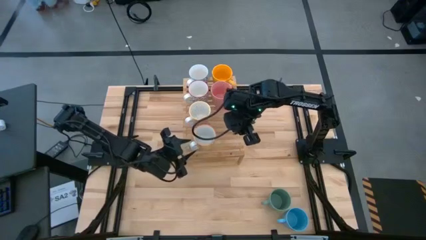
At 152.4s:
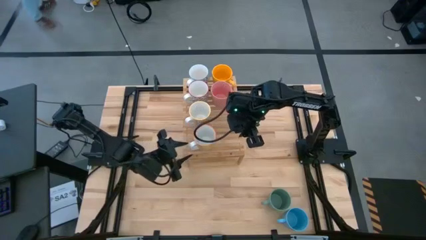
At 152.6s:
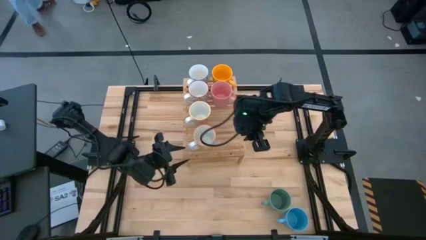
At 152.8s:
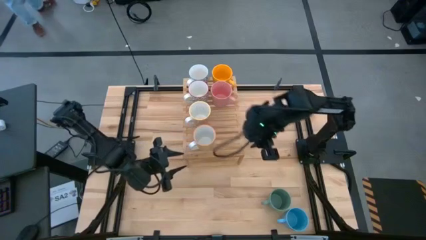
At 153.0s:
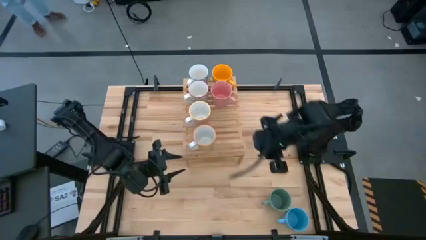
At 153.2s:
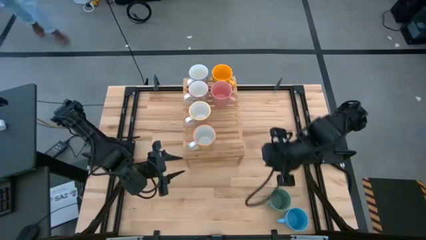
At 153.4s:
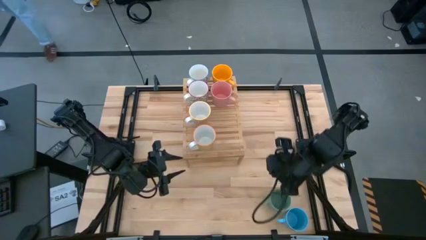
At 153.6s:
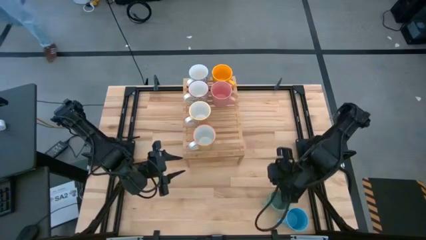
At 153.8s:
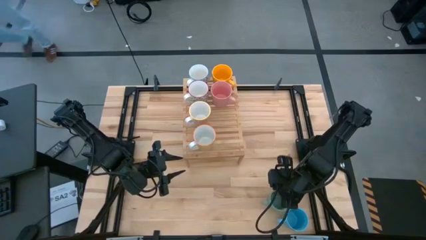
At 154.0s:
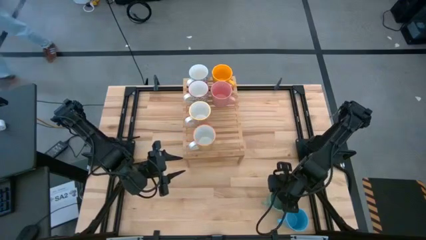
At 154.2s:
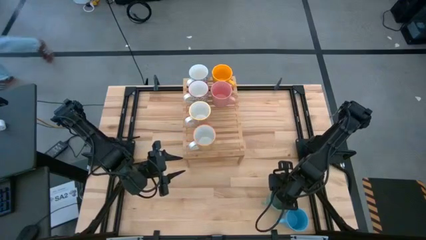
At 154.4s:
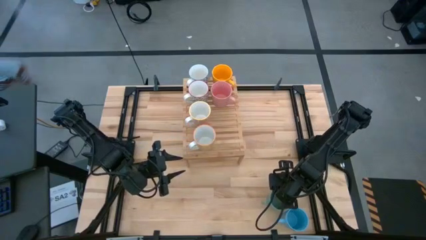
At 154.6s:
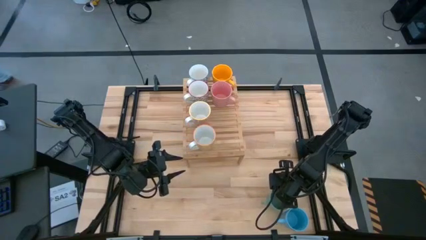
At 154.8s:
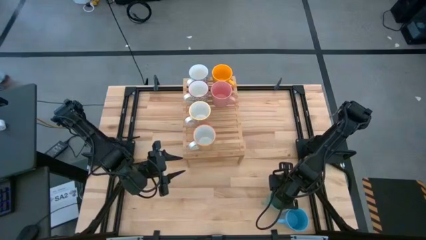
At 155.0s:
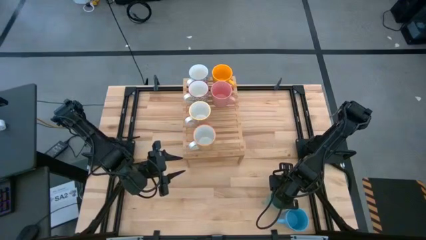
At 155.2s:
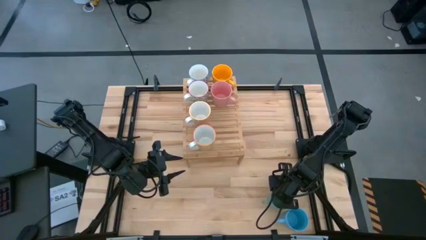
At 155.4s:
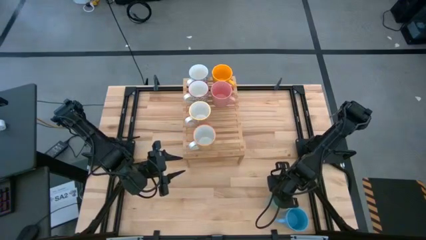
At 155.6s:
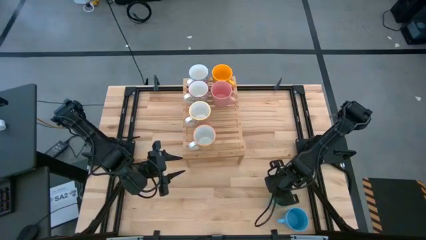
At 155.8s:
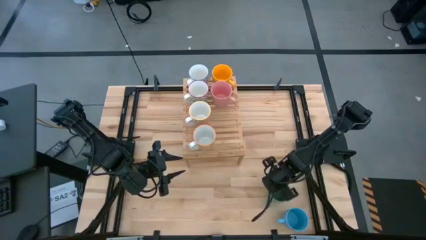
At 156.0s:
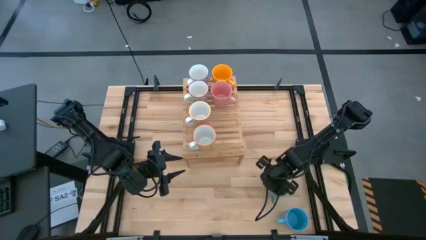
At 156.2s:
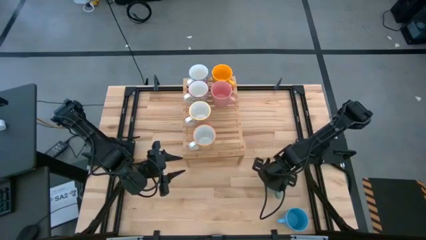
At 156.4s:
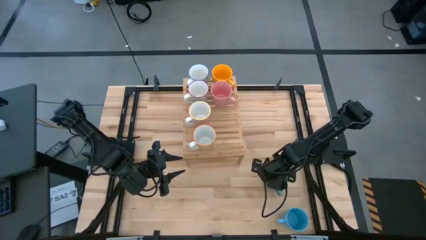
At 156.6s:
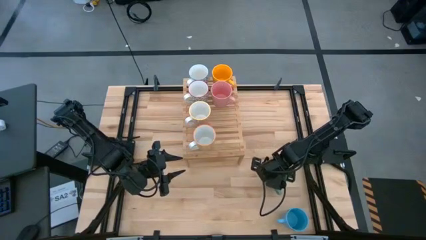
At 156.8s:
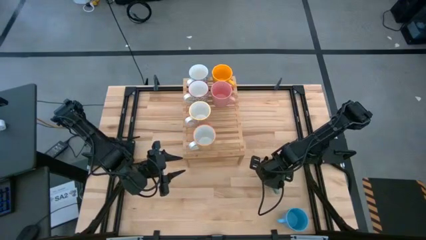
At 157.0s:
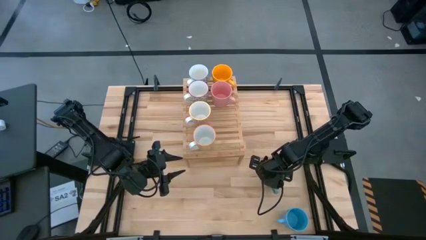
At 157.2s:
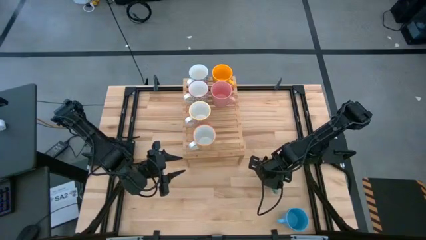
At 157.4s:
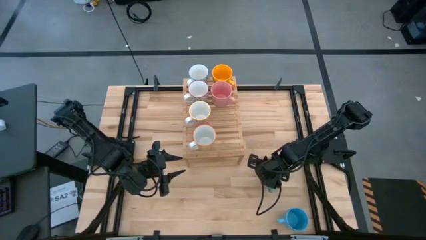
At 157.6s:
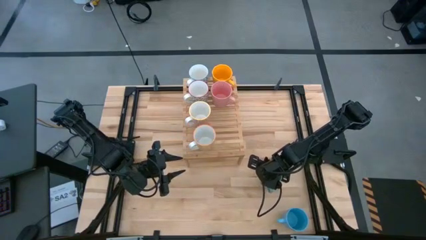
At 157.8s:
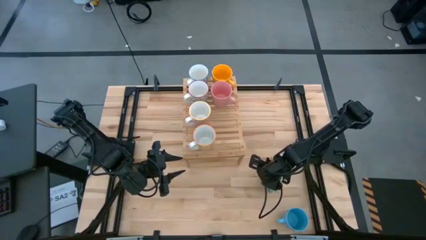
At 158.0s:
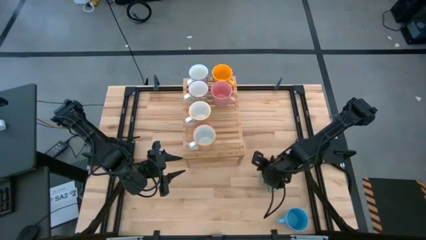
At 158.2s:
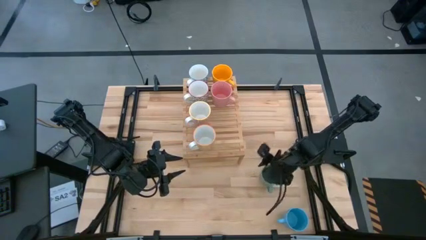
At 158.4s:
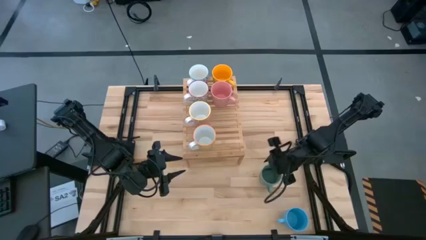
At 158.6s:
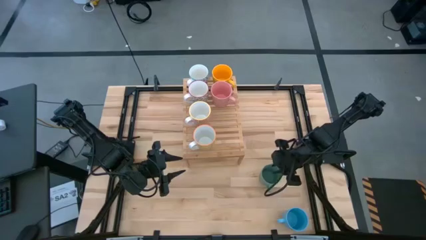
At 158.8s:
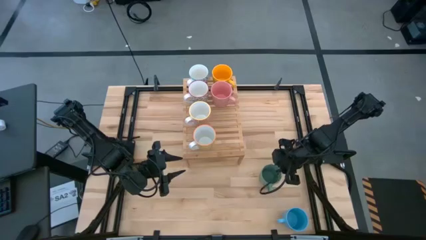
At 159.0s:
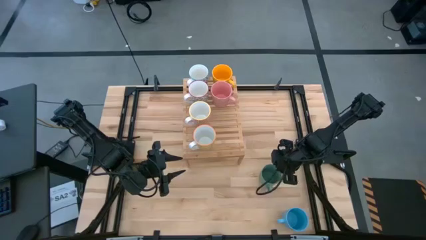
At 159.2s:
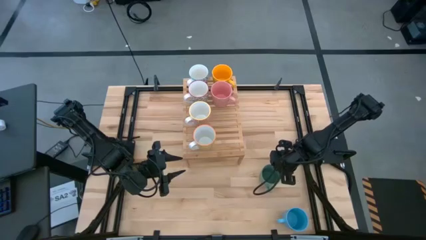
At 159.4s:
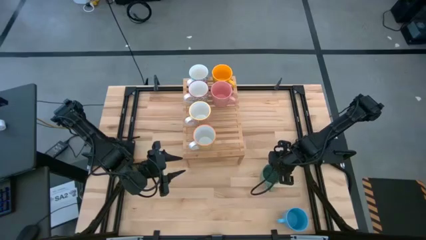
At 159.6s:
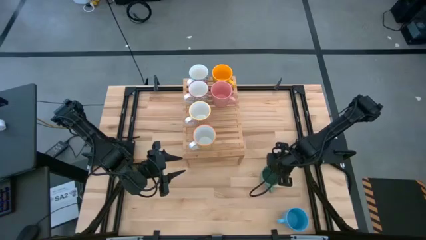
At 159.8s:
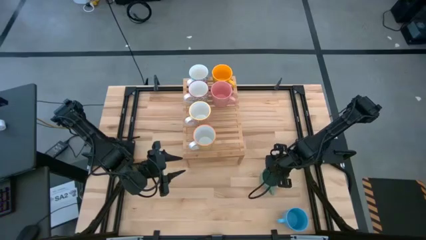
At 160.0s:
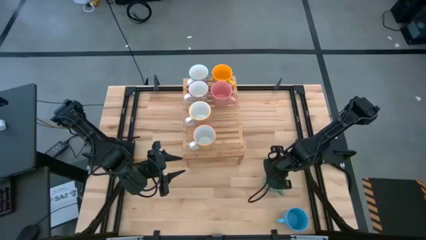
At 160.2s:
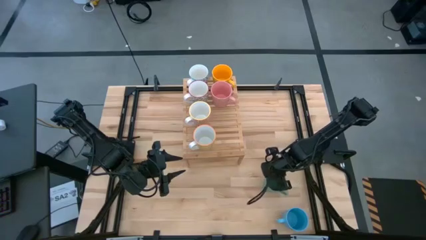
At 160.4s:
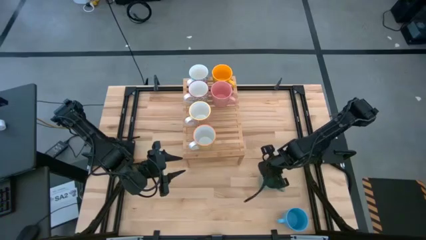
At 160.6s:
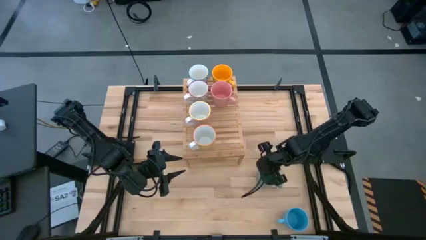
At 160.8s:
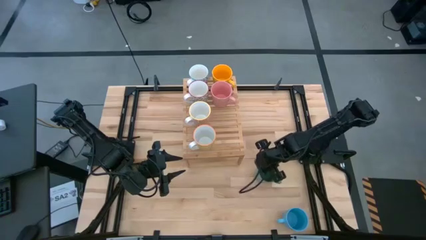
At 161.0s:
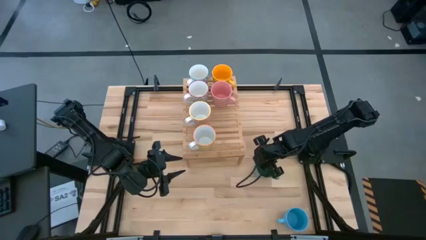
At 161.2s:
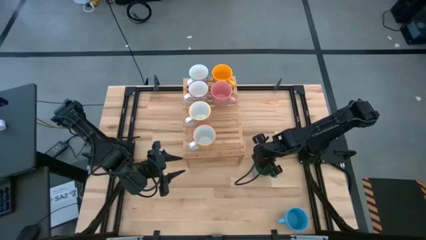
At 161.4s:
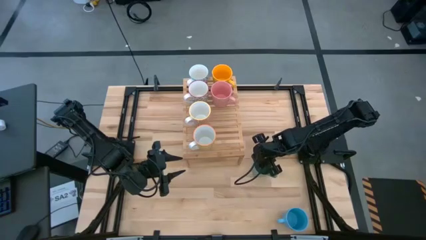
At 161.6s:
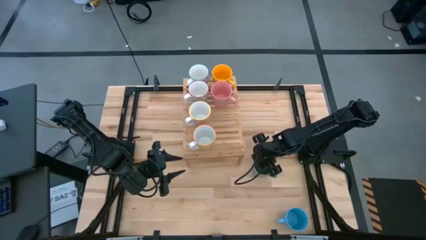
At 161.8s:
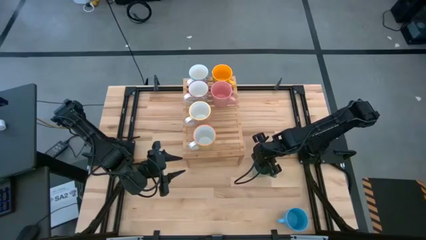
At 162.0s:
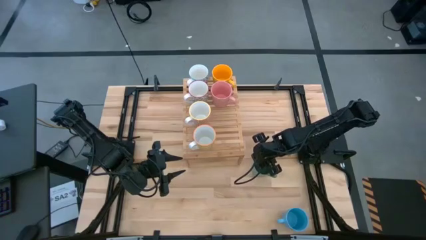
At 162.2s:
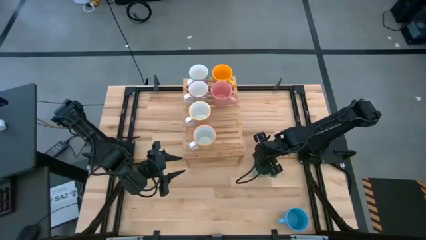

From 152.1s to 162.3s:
Task: Place coffee mugs
Put the green cup on the shelf aligned with the other pink cup

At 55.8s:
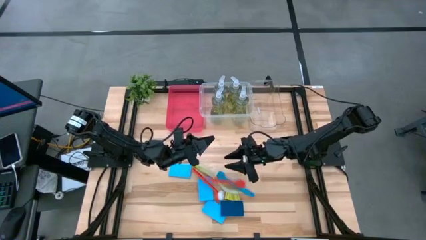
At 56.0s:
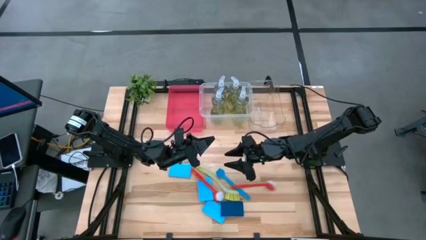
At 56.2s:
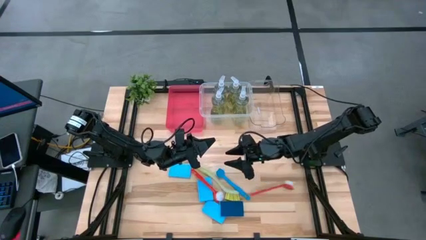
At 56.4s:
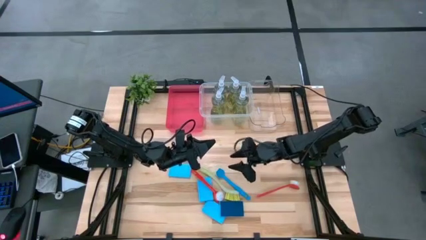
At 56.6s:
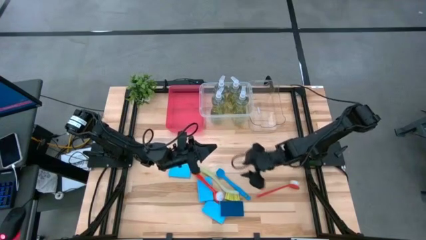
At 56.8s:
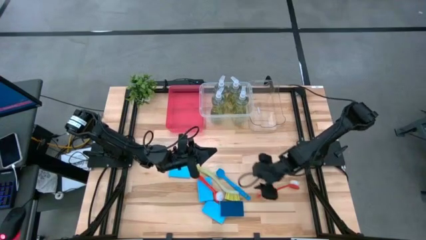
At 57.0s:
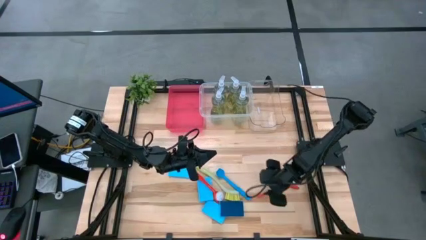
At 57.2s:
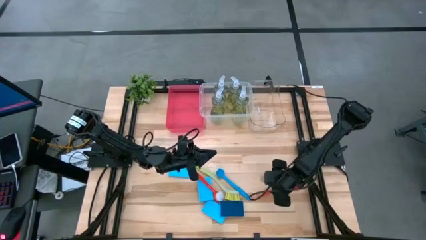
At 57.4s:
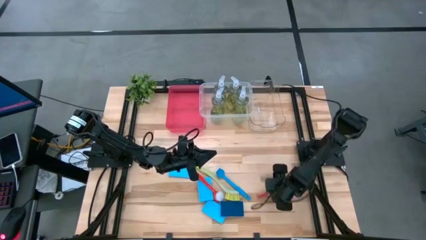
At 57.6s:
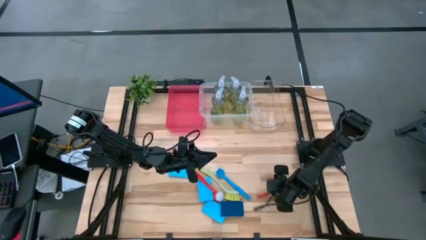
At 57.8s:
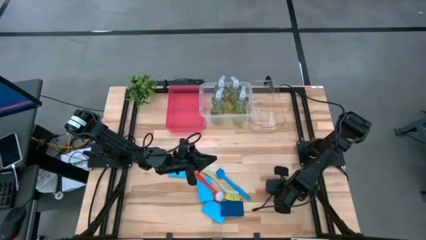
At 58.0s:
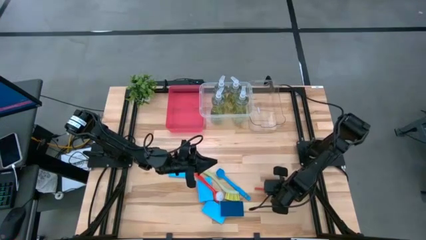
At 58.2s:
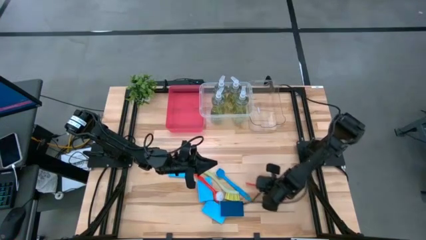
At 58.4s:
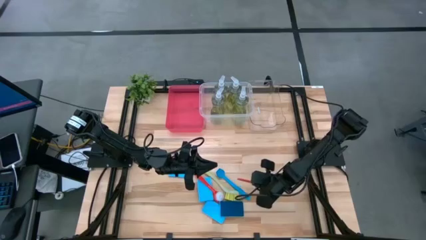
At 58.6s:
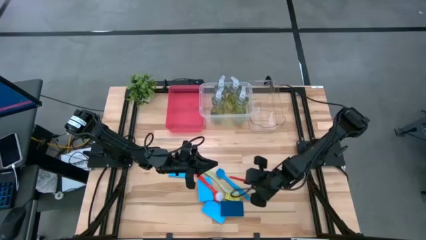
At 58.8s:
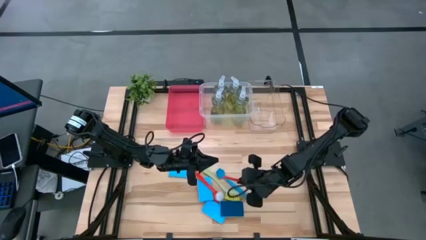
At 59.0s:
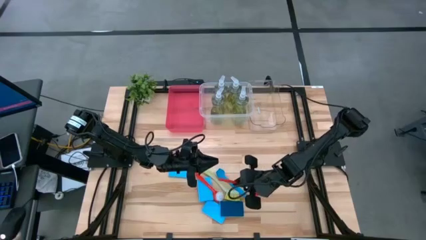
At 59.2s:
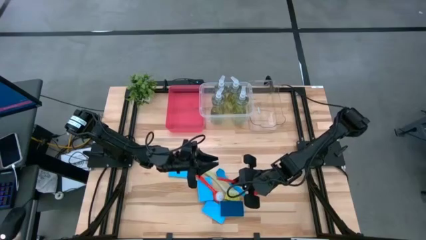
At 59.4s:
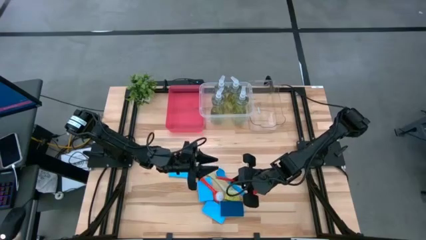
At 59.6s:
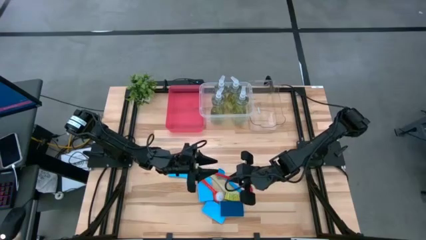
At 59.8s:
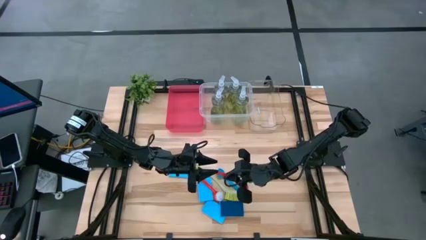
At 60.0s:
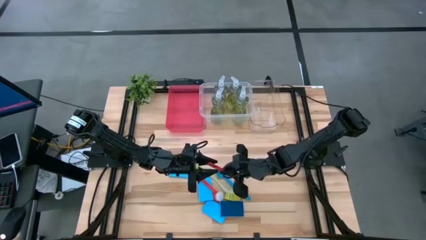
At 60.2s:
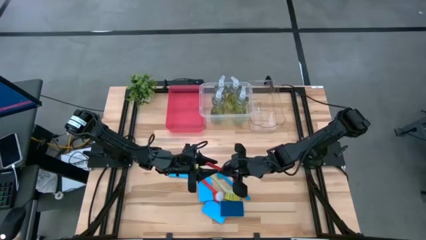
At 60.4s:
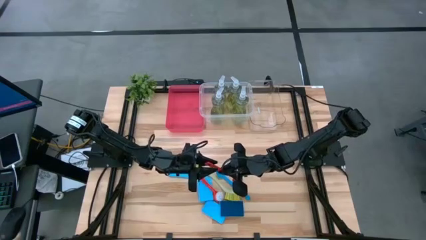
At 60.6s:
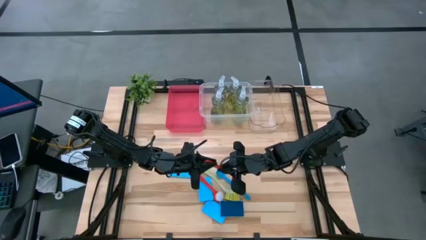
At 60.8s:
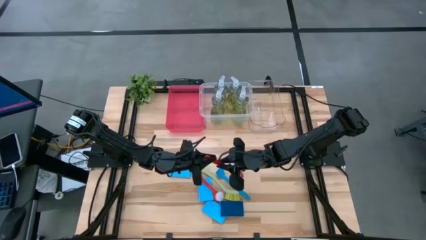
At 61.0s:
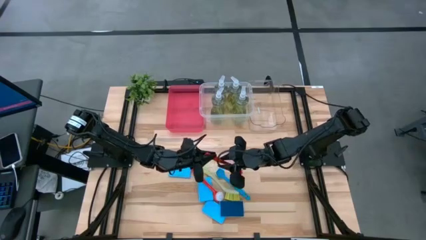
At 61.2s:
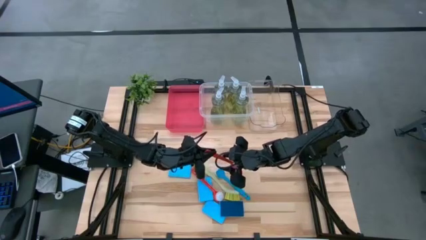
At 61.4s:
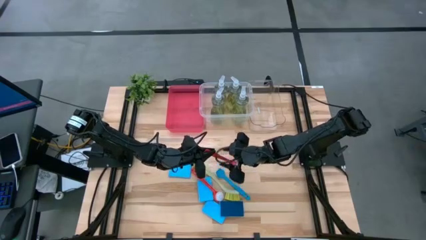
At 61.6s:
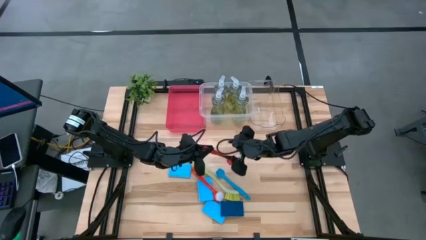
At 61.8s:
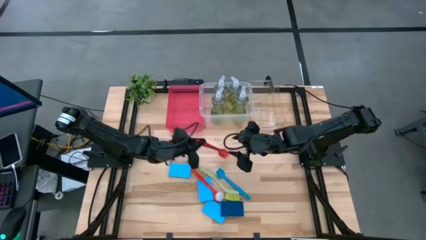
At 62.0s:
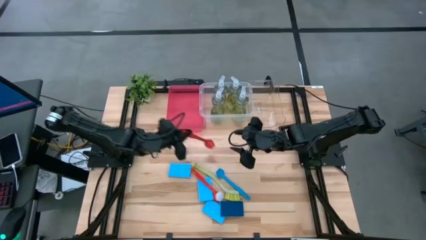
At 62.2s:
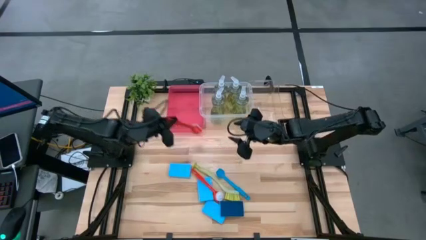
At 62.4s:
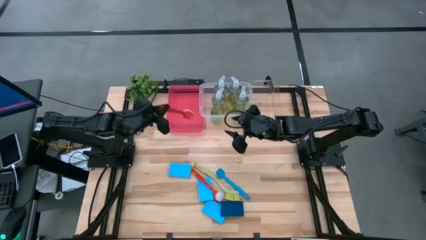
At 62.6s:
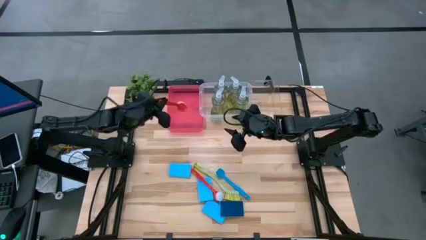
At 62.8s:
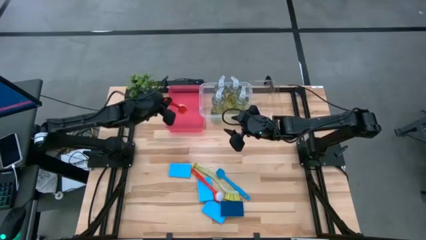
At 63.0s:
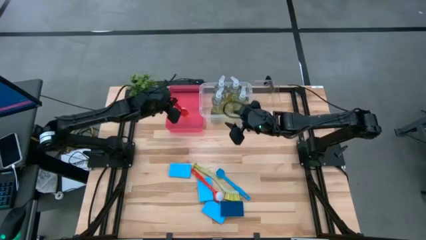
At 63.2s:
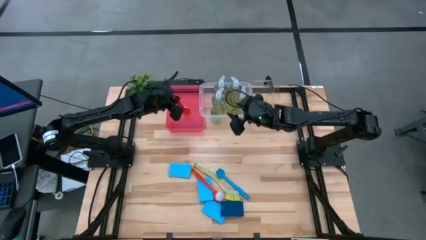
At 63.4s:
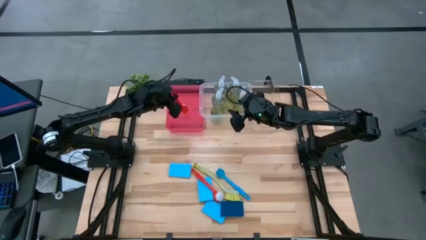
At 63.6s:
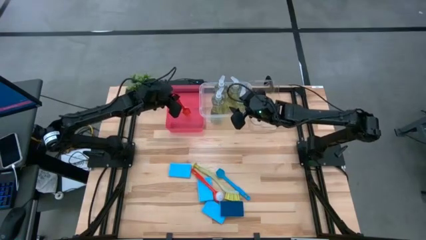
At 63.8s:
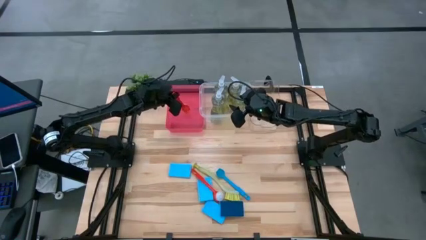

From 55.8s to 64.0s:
Task: Pick & Place Kitchen Sink Supplies
Put the red toilet brush into the red bin
